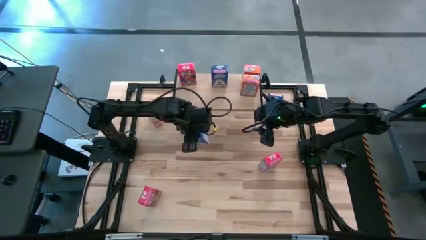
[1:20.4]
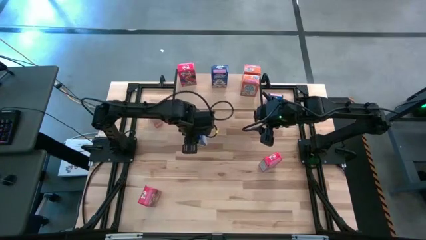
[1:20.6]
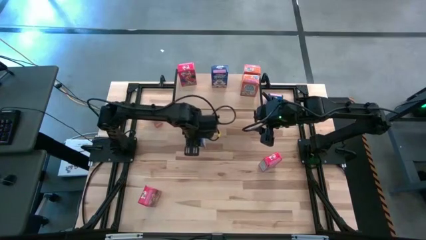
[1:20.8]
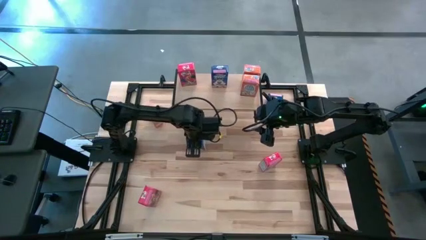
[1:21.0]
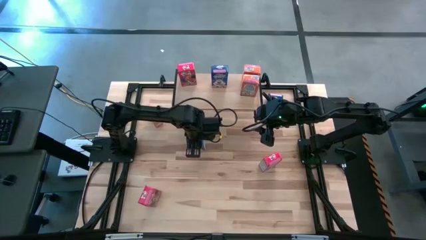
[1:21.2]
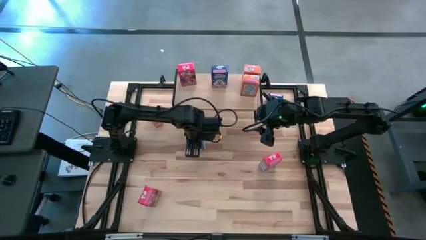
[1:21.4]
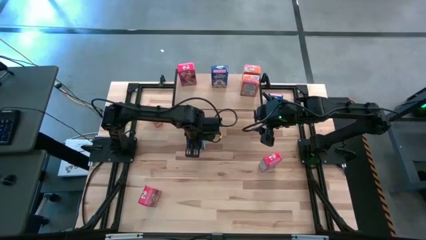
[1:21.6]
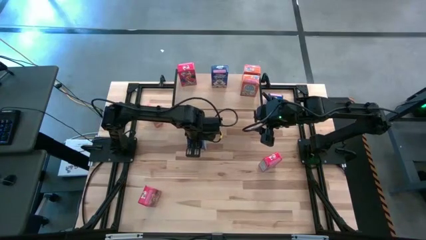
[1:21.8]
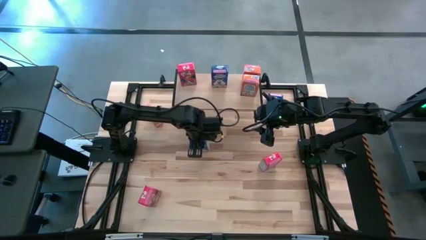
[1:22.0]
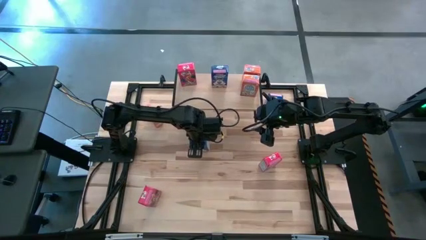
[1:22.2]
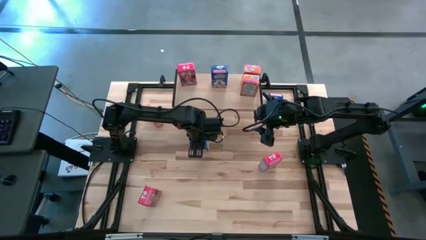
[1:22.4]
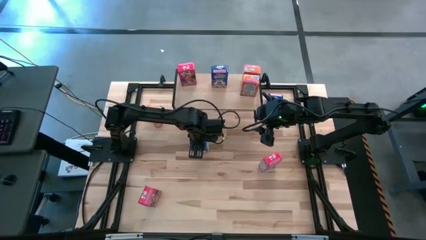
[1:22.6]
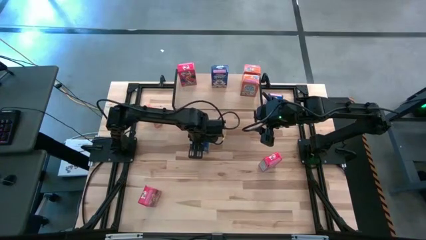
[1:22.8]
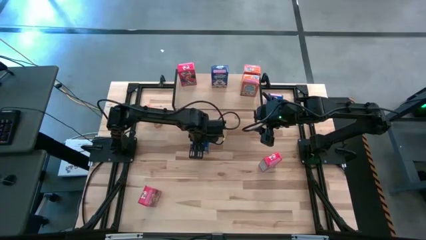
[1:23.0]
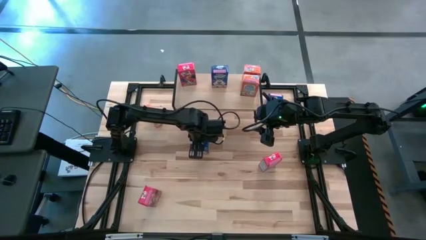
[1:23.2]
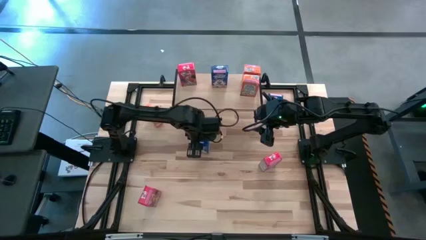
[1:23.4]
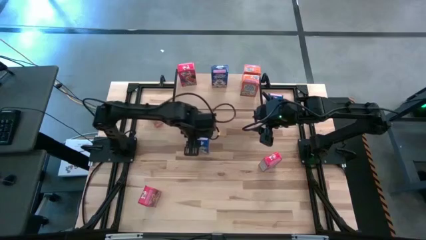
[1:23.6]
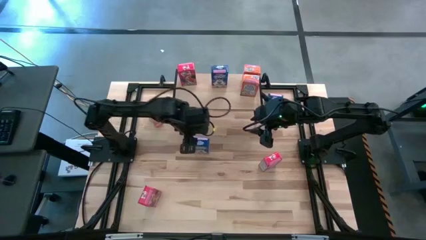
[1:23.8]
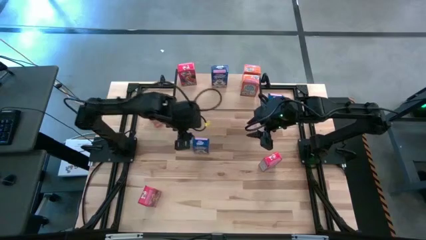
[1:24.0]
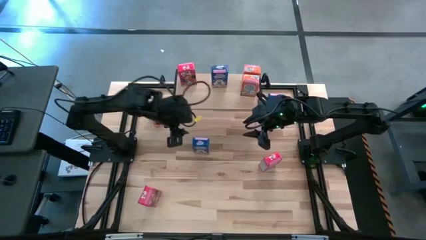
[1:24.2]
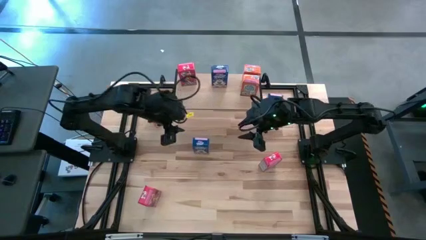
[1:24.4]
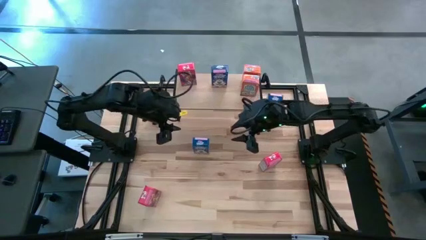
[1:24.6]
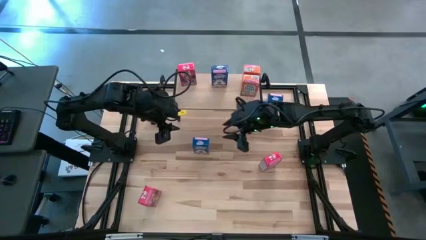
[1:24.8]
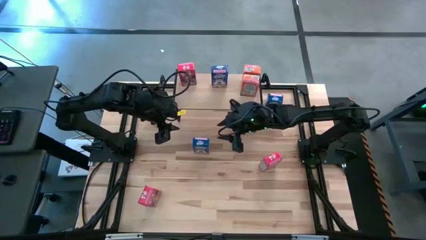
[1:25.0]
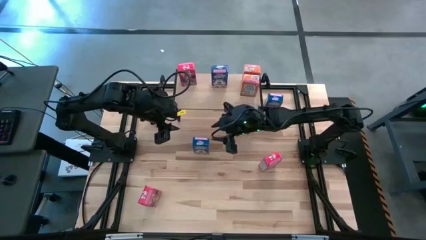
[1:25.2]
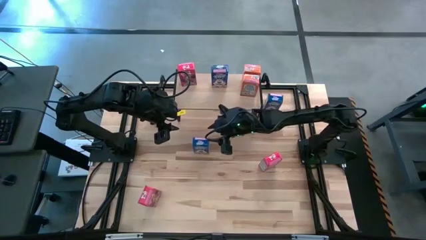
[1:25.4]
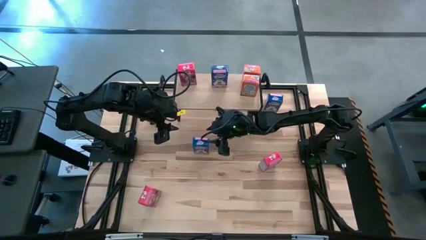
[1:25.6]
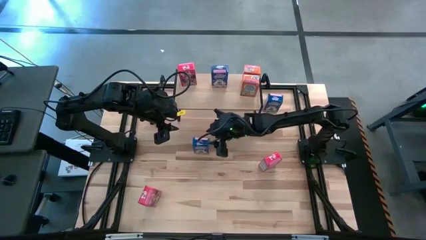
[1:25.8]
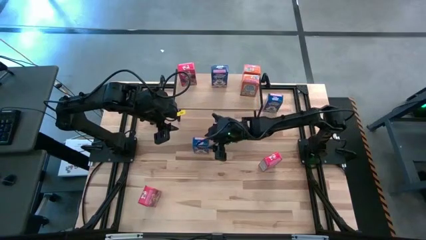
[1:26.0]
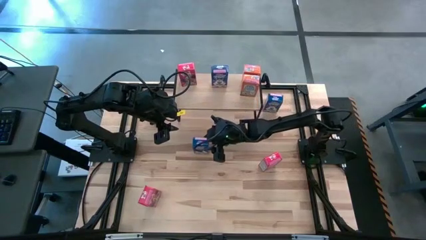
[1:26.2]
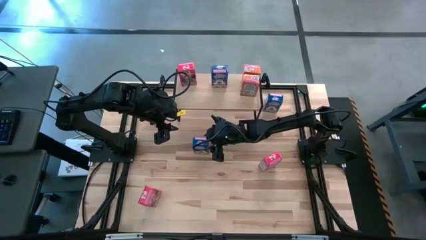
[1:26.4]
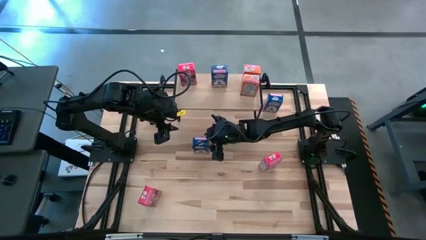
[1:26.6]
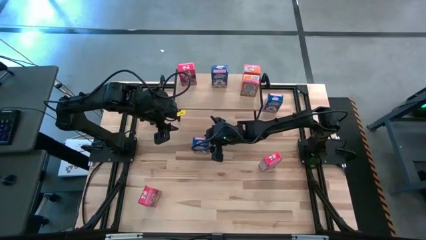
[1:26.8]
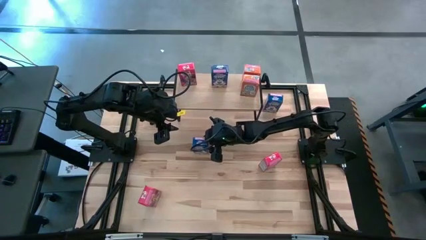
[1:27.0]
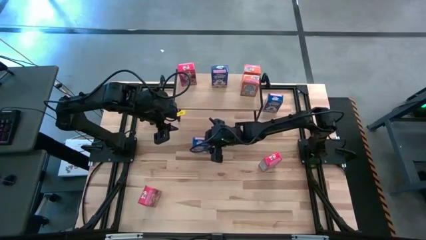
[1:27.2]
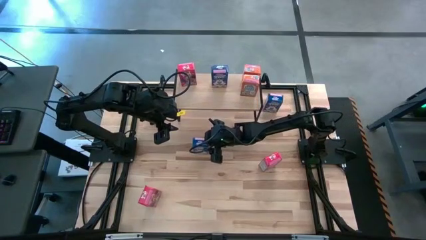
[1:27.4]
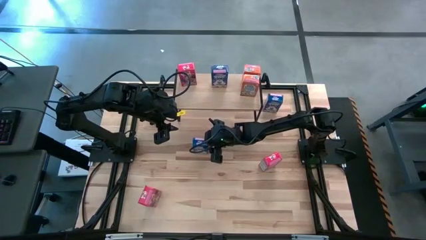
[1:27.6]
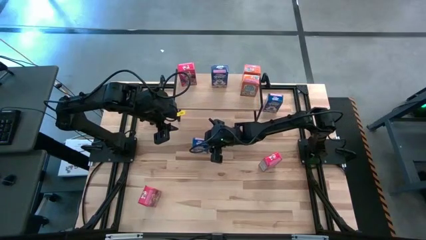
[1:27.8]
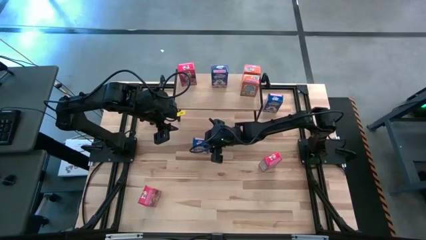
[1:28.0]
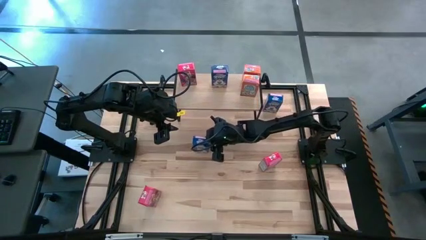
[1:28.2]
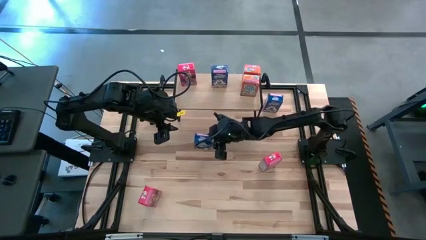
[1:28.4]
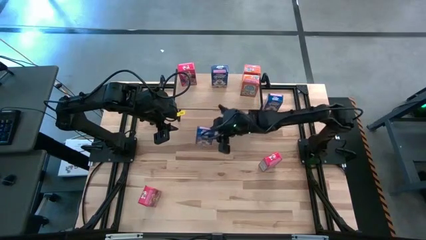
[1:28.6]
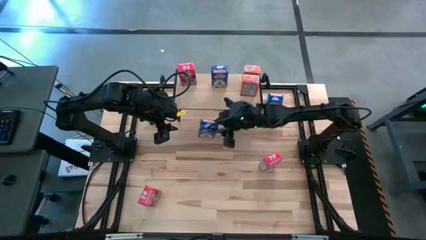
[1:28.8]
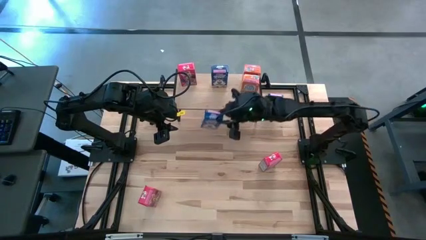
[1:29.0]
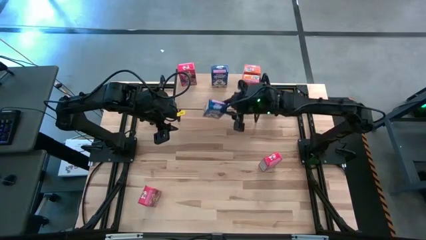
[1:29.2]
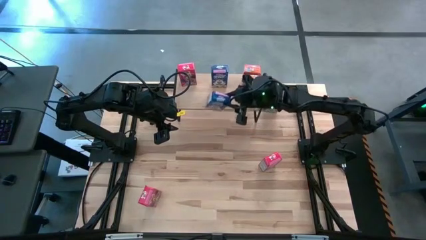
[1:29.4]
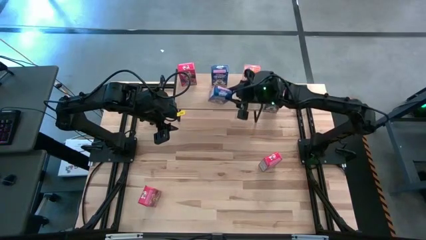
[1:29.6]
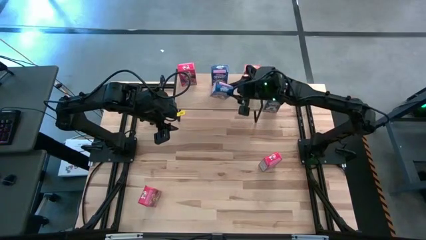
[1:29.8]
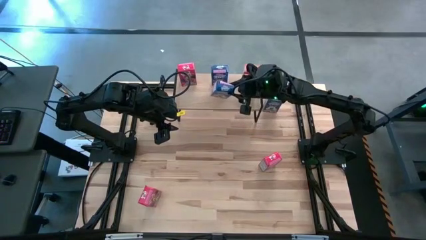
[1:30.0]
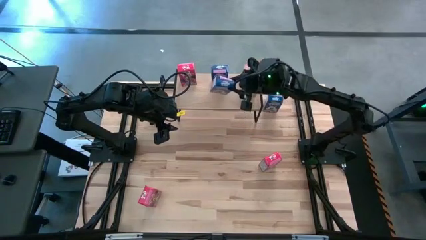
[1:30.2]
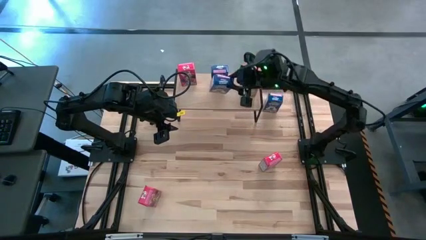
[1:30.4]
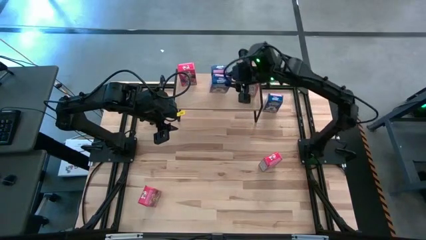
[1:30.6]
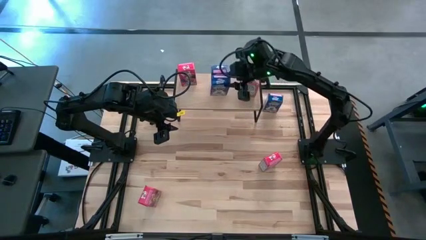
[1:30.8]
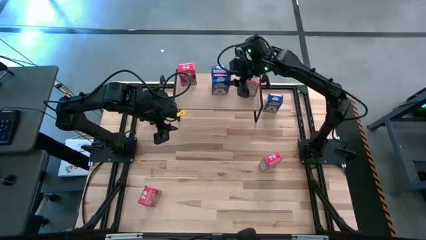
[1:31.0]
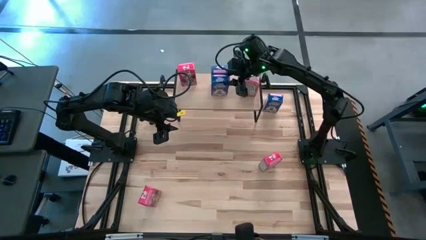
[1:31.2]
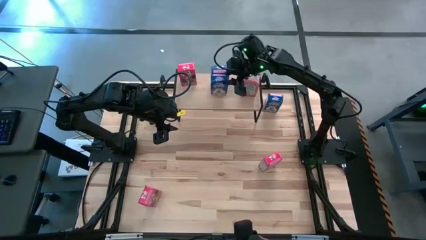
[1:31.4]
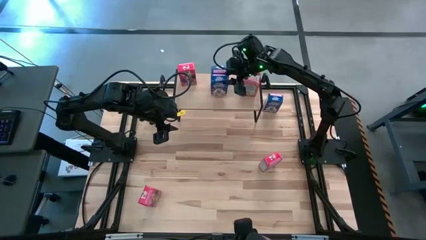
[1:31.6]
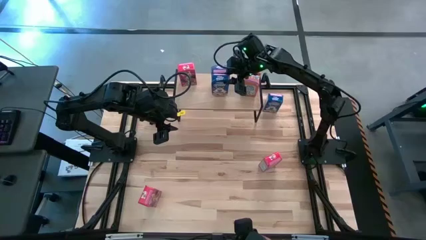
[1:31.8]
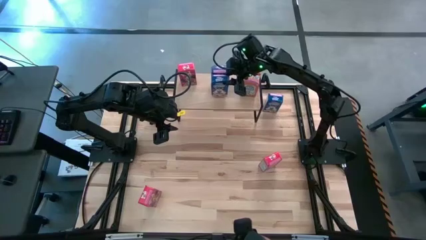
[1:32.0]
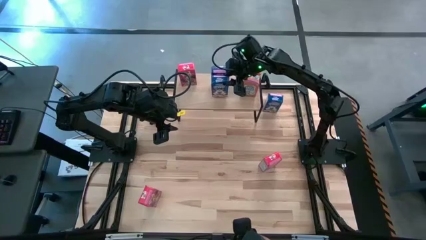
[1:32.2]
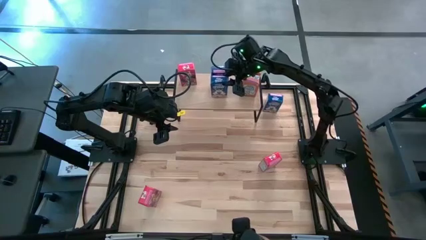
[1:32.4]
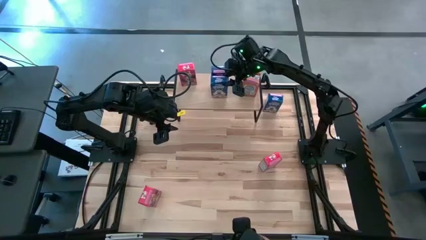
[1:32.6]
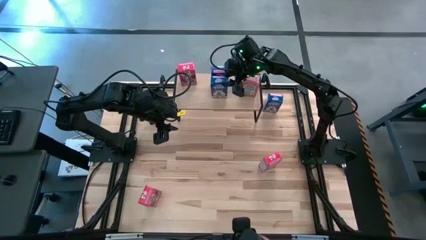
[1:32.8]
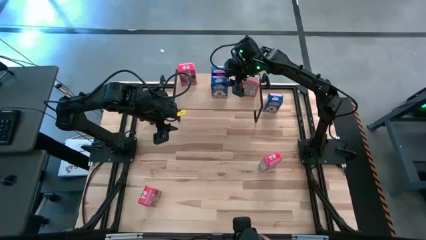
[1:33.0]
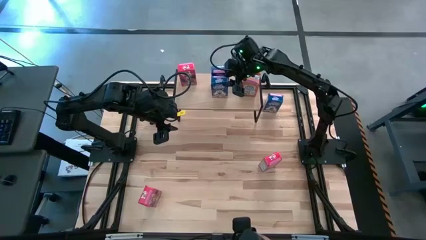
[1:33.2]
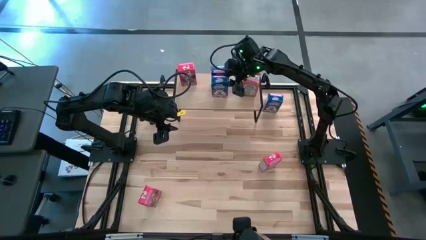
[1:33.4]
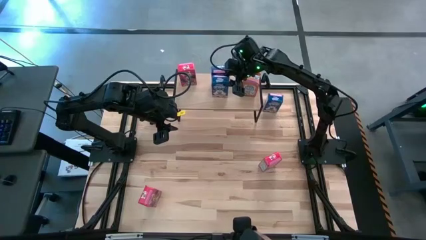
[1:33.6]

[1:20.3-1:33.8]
Task: Stack cereal on shelf
Put the bottom blue cereal box on the shelf

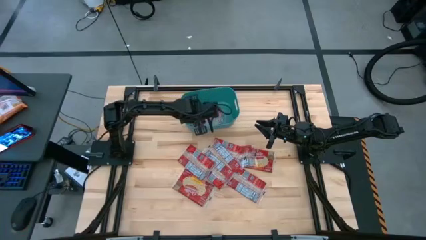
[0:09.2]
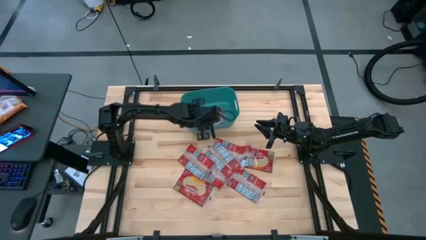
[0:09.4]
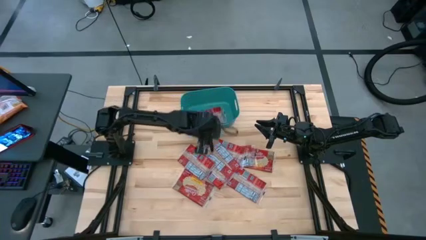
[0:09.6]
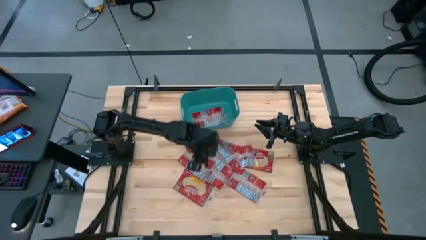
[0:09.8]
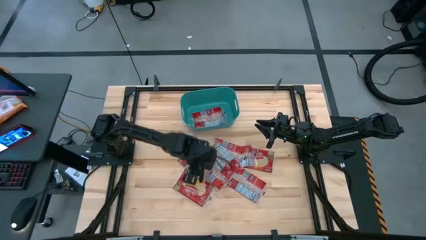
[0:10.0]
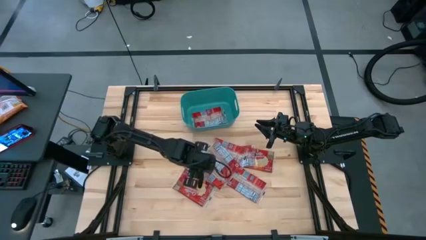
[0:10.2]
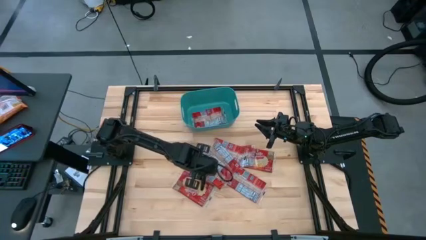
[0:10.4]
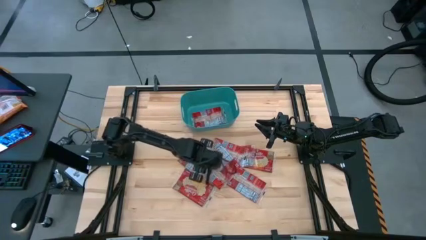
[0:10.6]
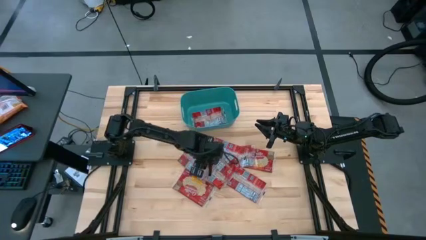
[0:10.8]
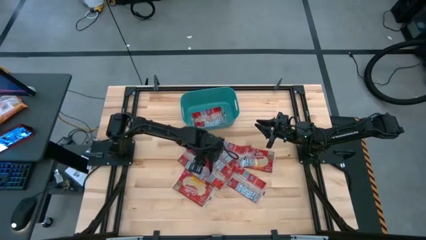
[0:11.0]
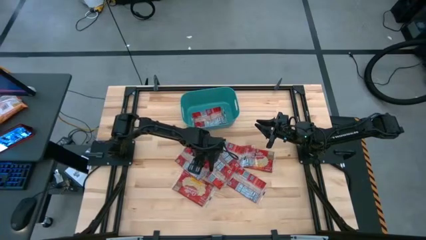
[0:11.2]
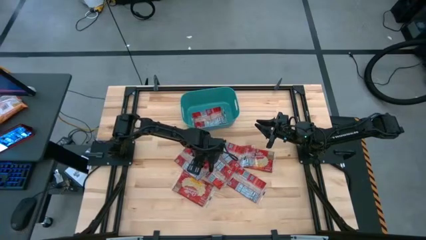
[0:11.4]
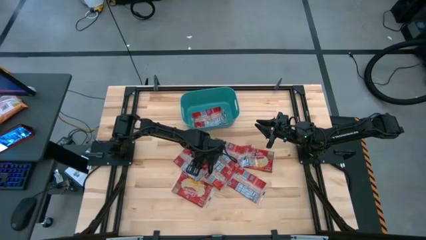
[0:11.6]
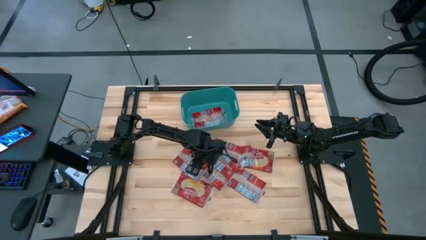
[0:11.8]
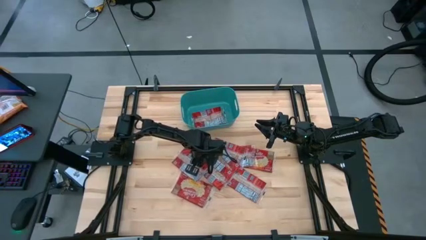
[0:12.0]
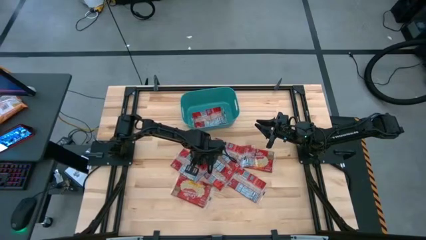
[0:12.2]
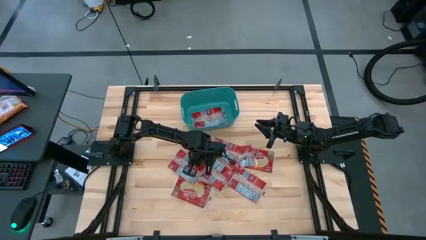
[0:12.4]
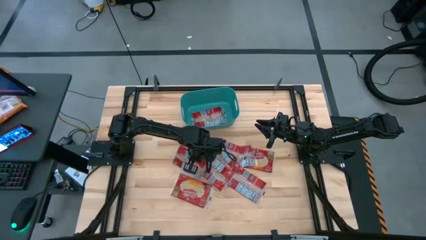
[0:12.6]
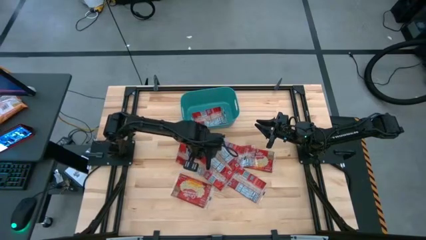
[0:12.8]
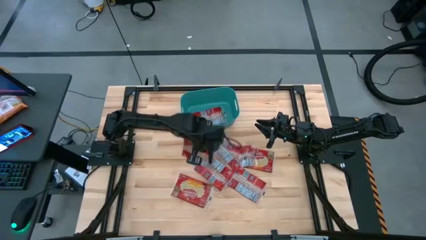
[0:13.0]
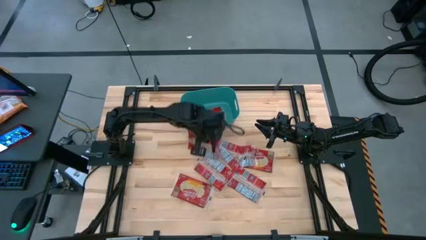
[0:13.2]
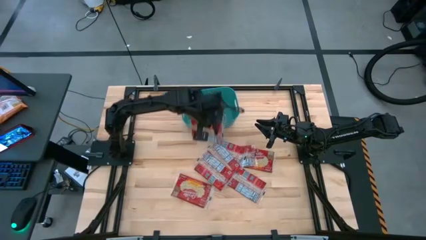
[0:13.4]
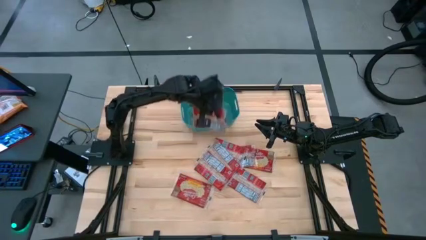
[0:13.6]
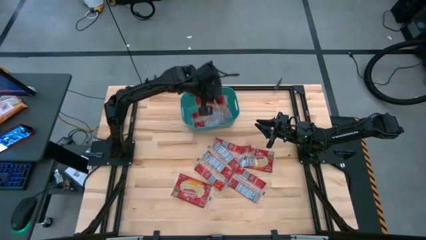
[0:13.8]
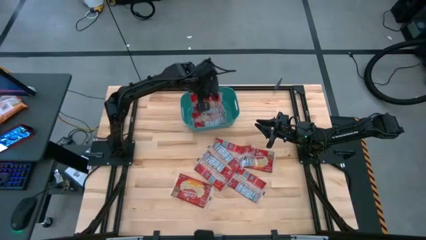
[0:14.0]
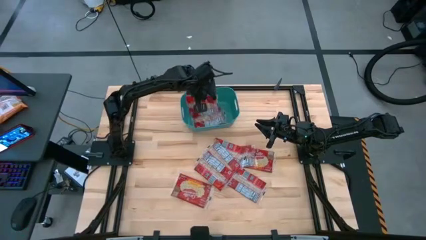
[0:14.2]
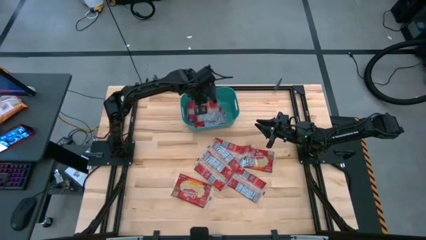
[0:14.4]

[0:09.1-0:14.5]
Task: Sort popcorn bags into baskets
Put the red popcorn bag into the blue bin
